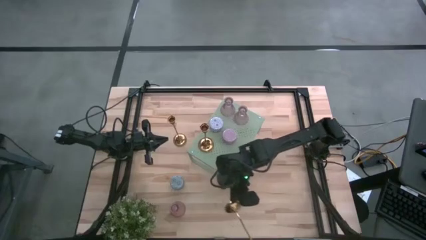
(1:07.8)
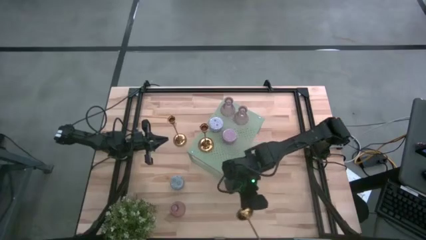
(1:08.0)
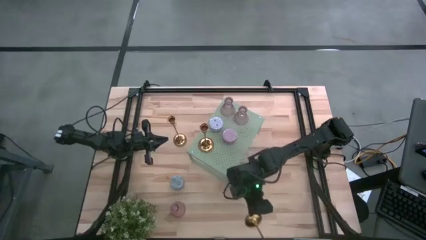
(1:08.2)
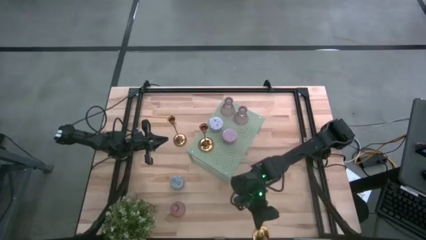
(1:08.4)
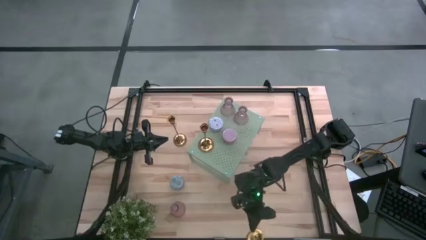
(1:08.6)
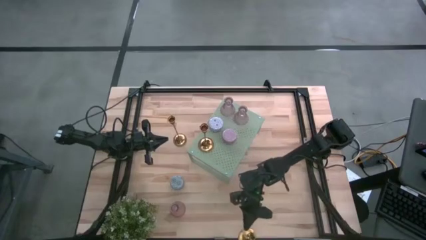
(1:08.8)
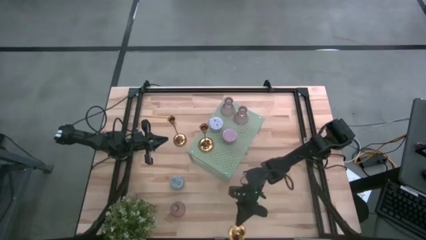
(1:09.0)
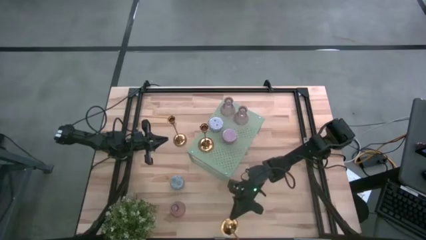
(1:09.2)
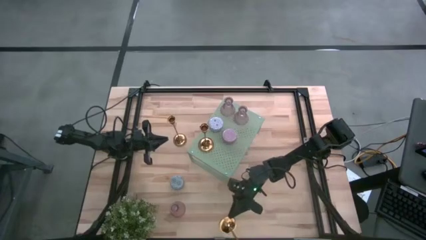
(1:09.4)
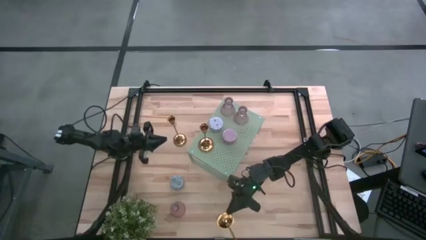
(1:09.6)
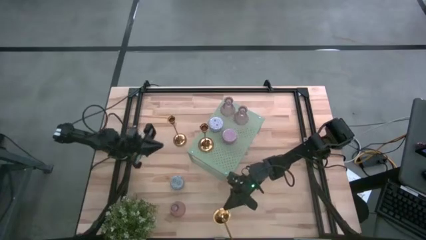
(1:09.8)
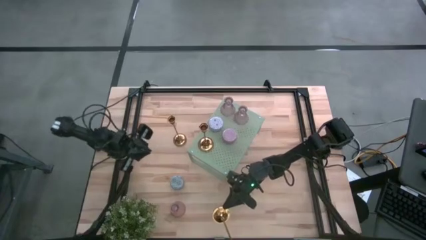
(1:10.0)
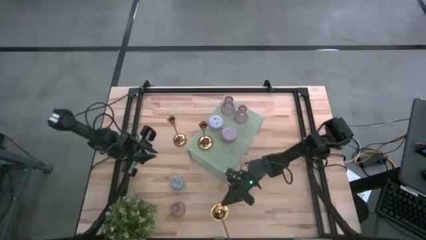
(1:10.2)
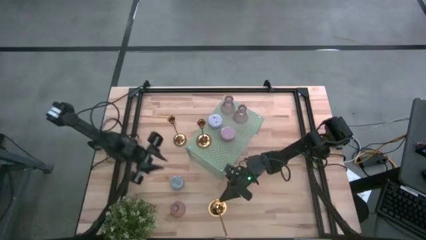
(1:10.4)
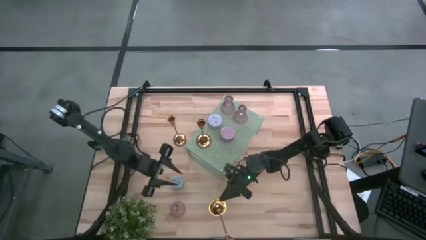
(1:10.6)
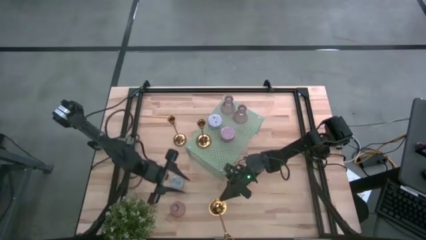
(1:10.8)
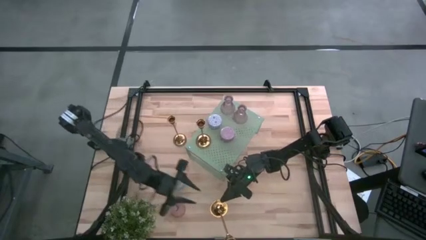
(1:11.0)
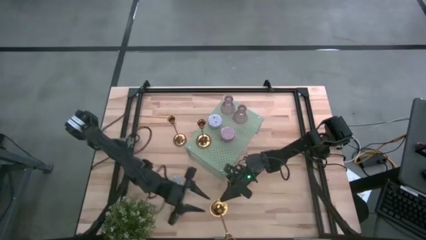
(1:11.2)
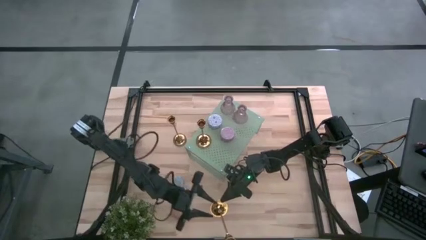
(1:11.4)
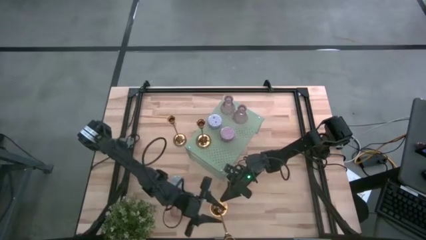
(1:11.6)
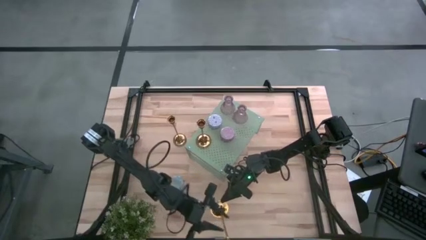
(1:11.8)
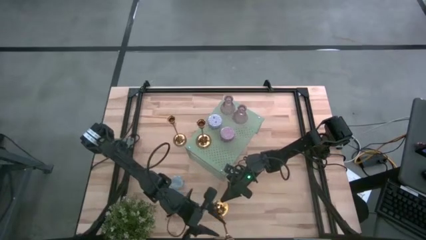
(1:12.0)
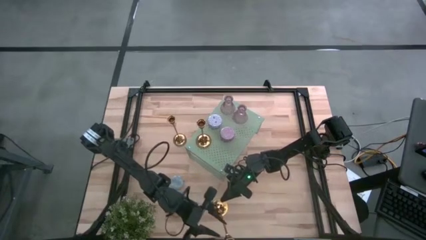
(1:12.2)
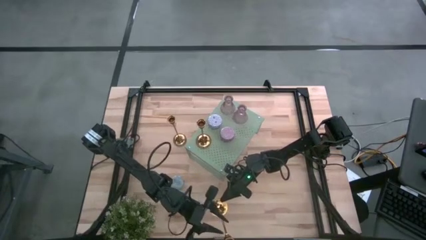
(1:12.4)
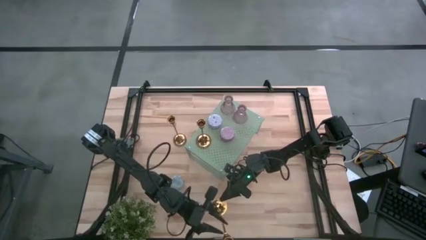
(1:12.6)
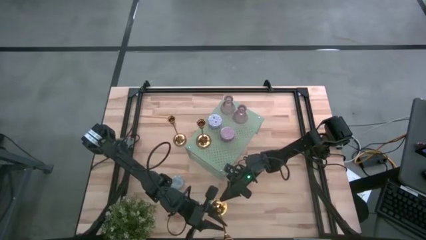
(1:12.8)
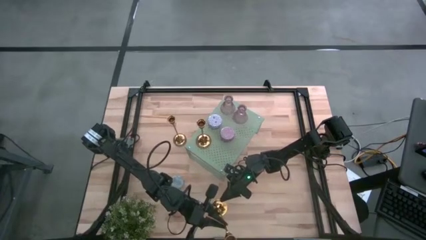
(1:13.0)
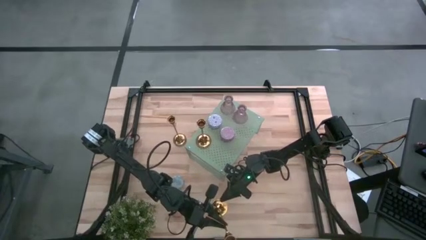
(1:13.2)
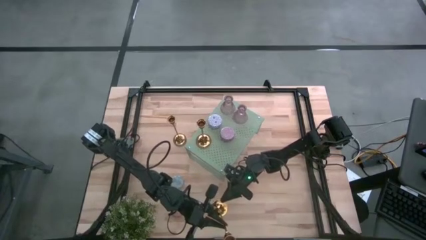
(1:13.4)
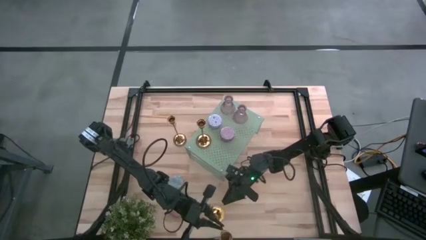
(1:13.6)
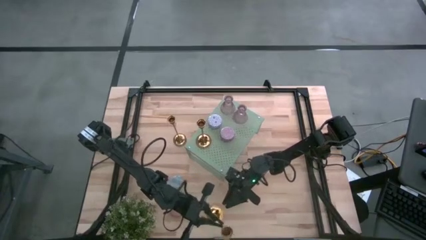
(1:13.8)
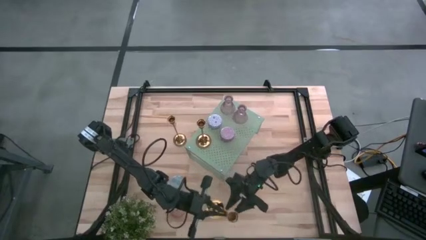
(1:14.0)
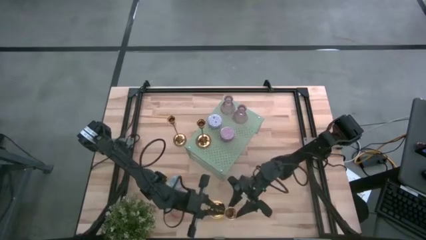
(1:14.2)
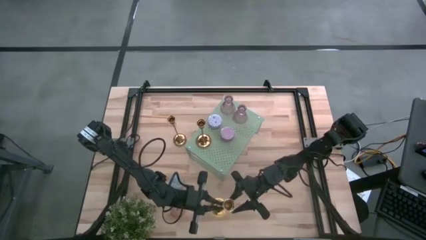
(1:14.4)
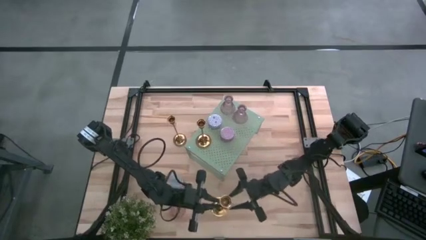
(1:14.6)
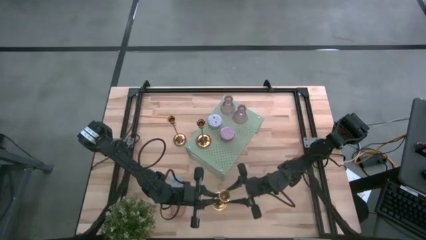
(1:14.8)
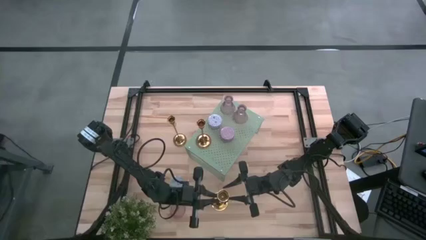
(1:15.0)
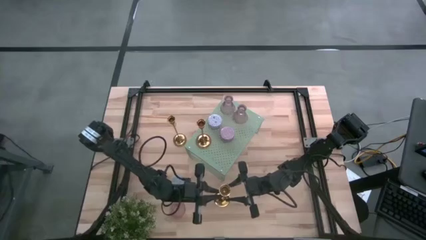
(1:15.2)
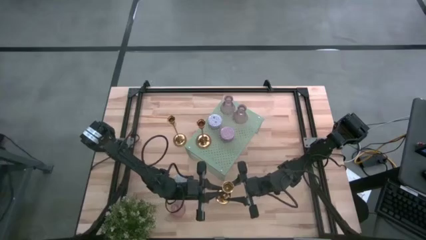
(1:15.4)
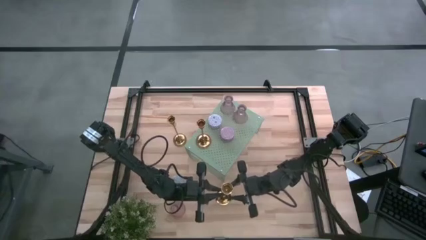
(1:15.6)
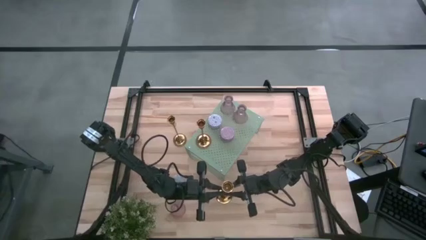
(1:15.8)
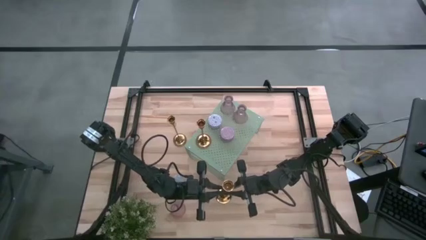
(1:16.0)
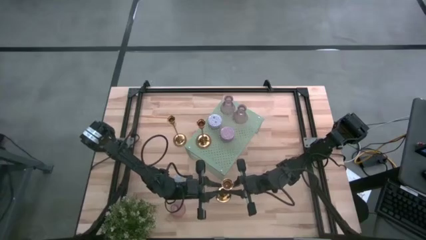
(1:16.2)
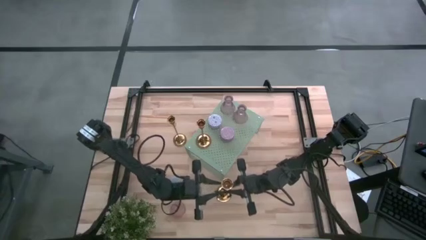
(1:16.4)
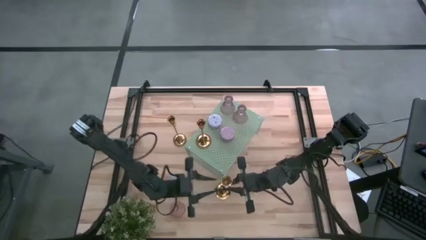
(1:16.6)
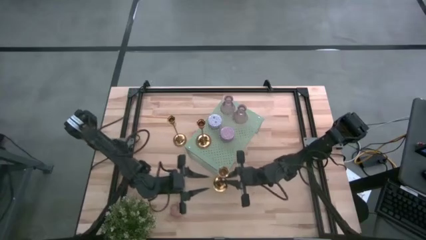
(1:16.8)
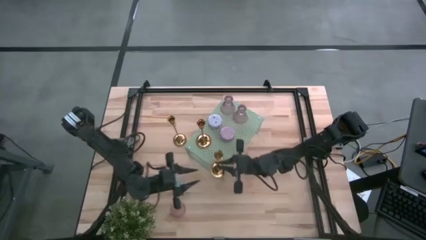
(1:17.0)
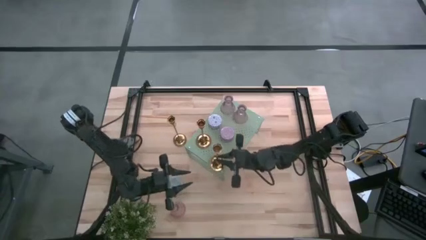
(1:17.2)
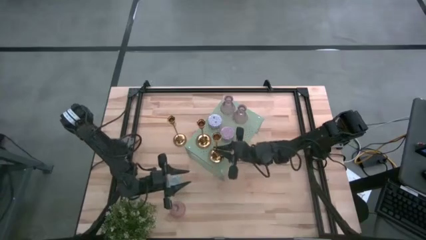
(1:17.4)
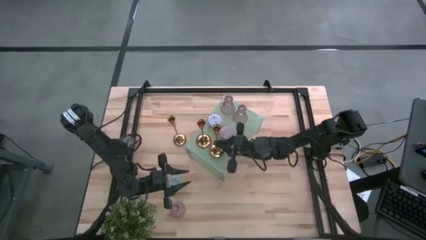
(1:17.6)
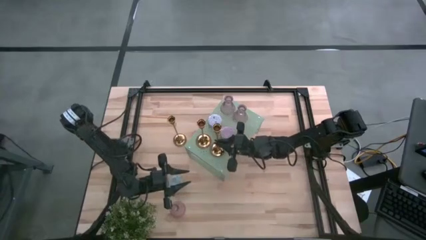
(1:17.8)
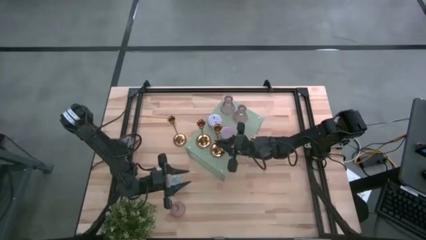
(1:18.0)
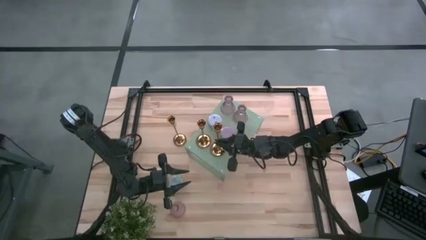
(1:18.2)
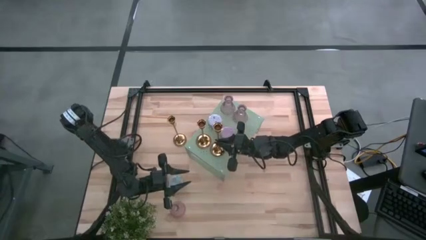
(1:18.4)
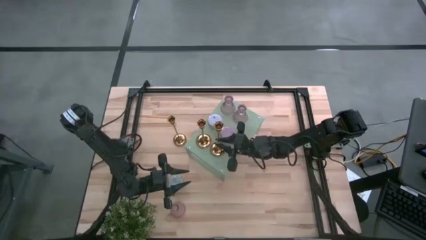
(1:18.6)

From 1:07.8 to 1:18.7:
Task: Pick & Place candle stick holders
Put the right gold candle holder aligned with the other gold candle holder on the shelf
